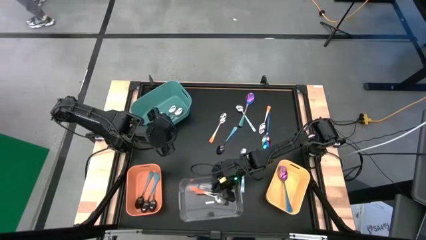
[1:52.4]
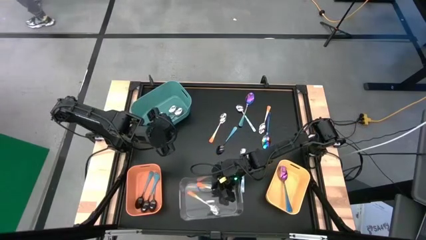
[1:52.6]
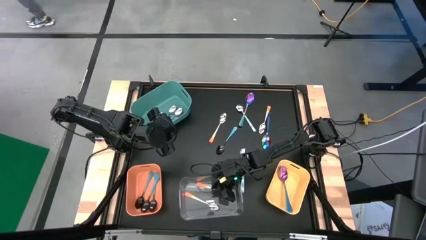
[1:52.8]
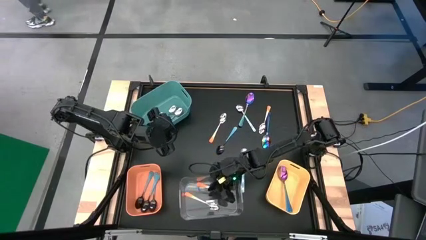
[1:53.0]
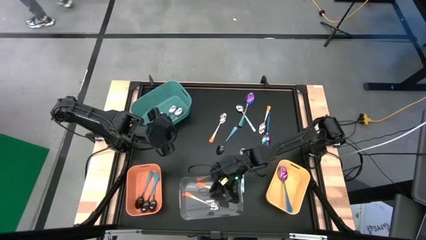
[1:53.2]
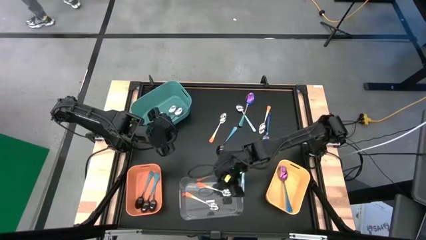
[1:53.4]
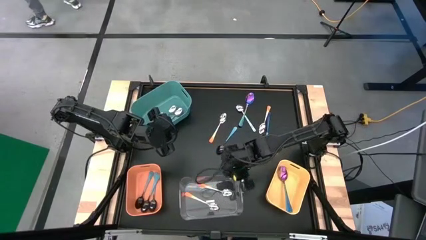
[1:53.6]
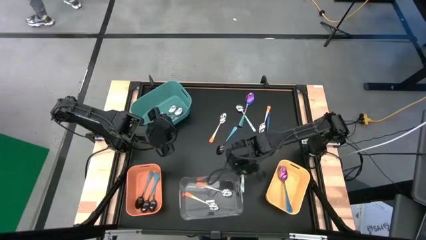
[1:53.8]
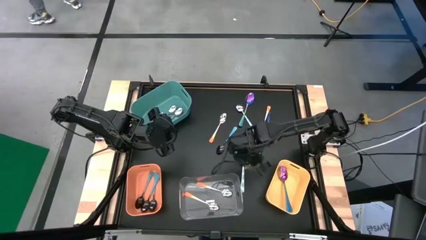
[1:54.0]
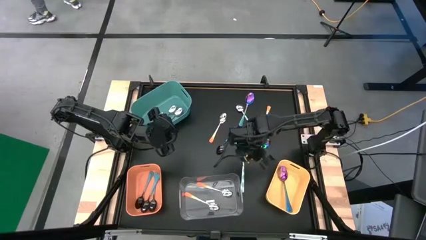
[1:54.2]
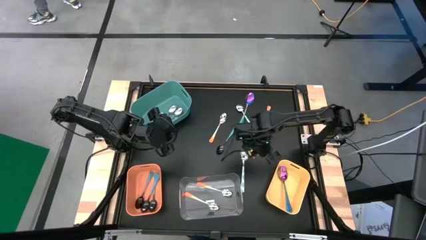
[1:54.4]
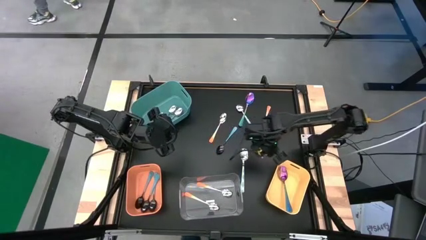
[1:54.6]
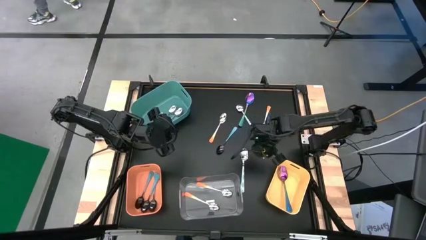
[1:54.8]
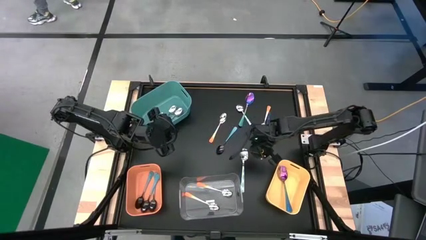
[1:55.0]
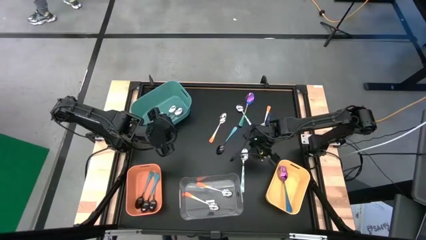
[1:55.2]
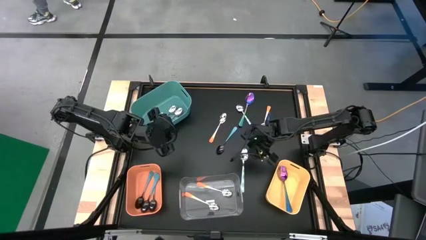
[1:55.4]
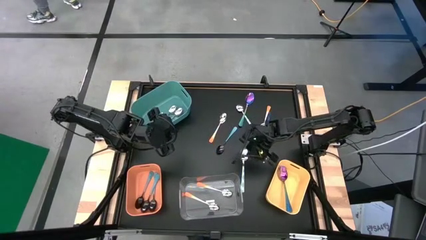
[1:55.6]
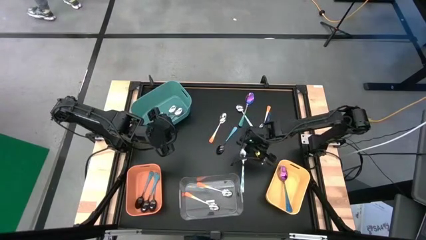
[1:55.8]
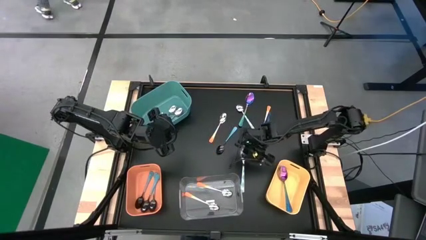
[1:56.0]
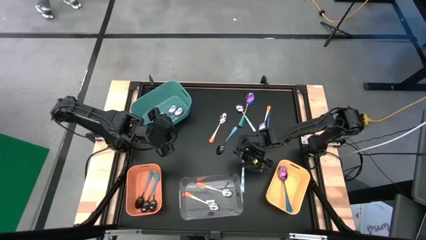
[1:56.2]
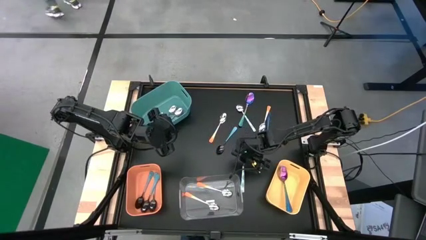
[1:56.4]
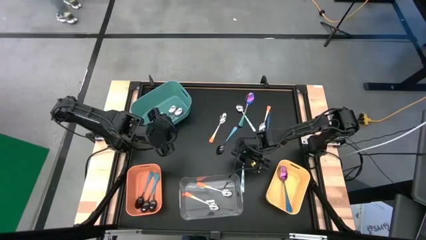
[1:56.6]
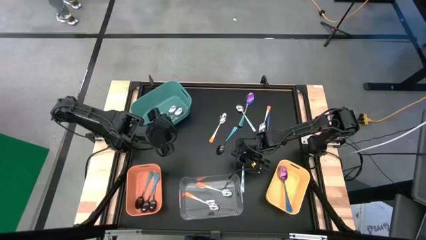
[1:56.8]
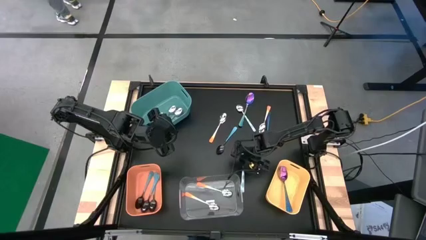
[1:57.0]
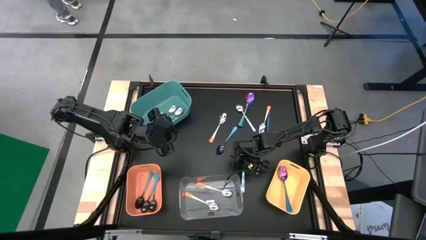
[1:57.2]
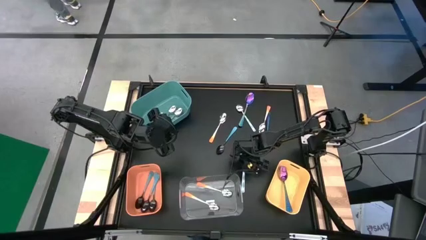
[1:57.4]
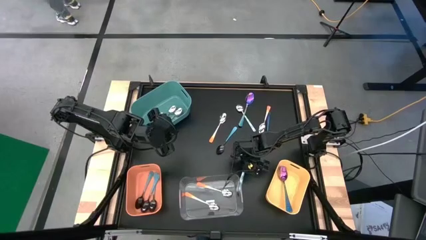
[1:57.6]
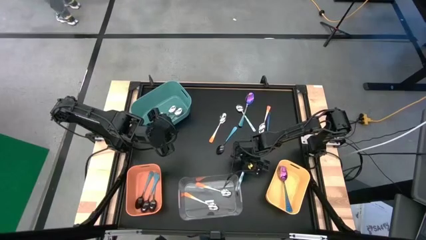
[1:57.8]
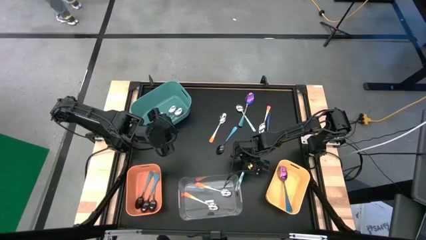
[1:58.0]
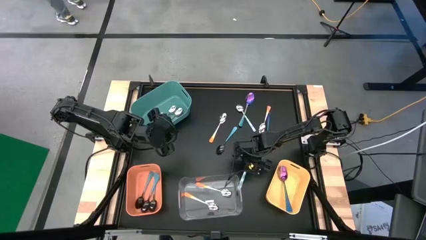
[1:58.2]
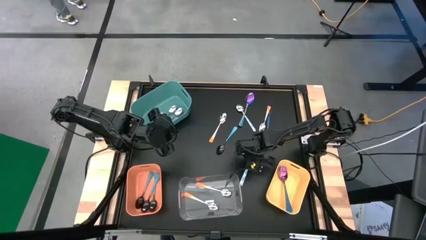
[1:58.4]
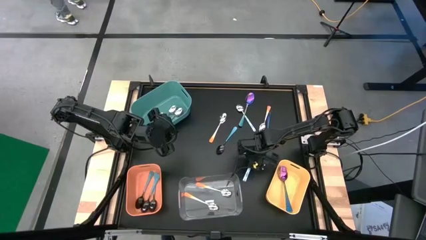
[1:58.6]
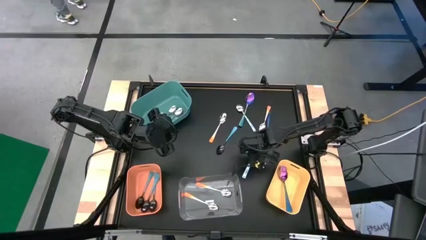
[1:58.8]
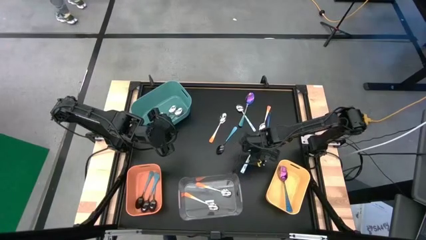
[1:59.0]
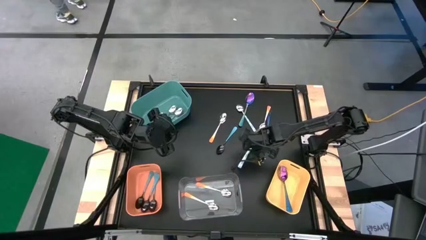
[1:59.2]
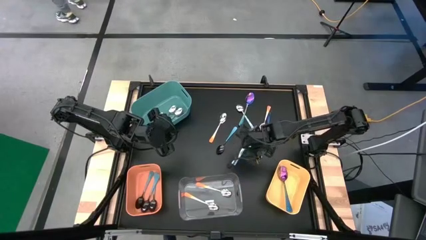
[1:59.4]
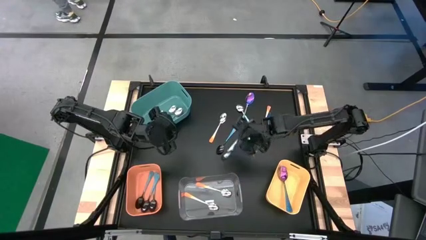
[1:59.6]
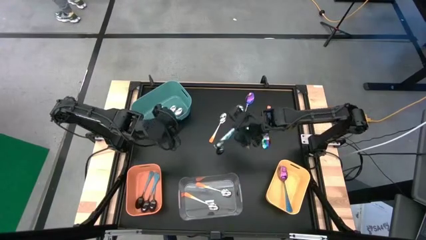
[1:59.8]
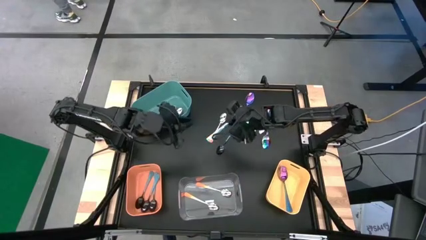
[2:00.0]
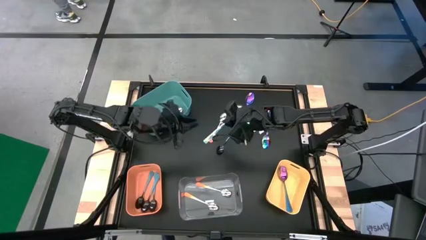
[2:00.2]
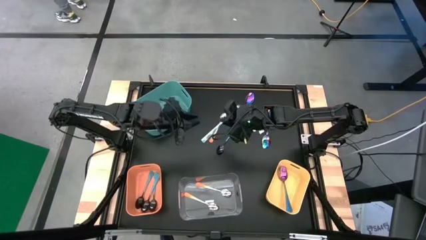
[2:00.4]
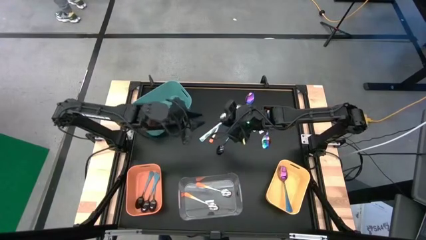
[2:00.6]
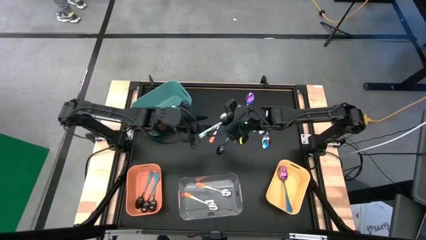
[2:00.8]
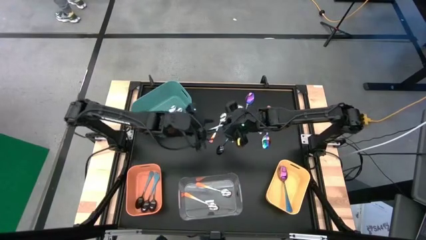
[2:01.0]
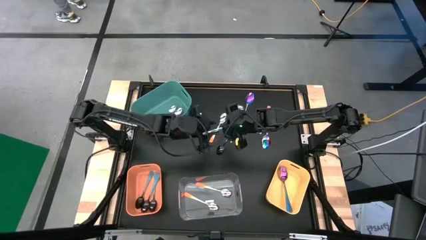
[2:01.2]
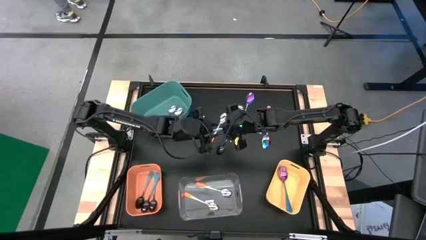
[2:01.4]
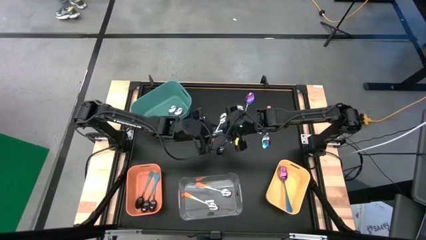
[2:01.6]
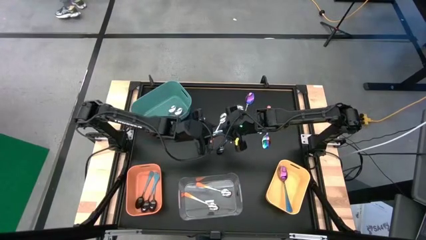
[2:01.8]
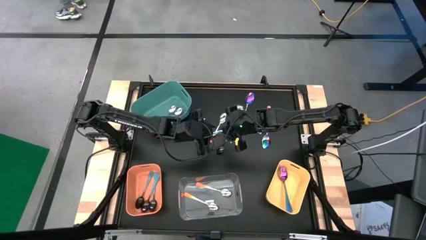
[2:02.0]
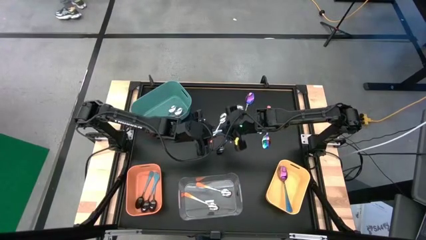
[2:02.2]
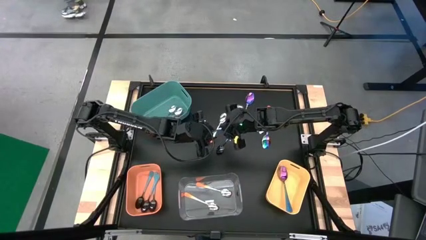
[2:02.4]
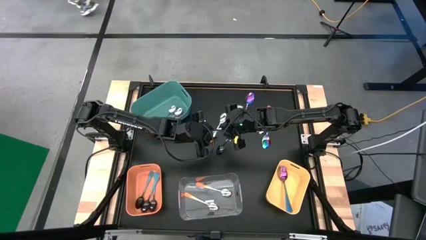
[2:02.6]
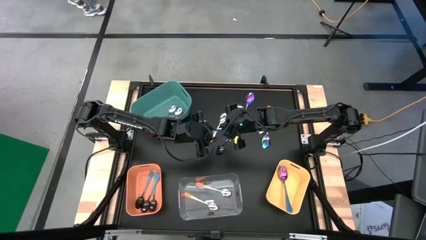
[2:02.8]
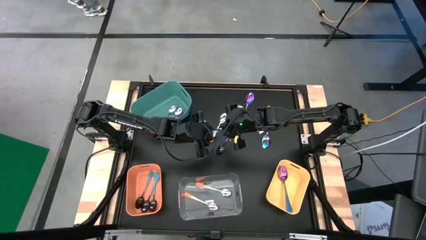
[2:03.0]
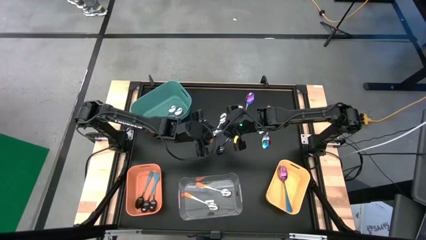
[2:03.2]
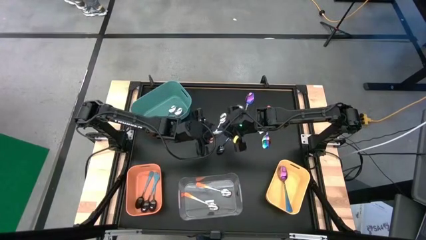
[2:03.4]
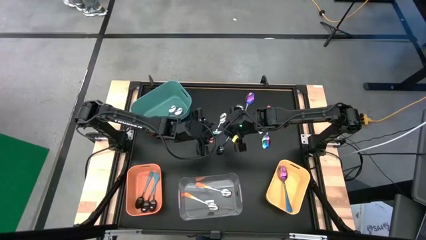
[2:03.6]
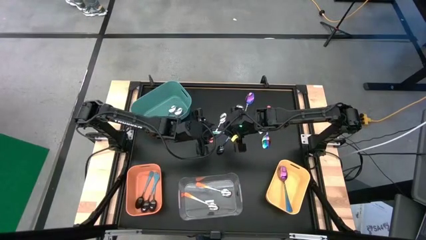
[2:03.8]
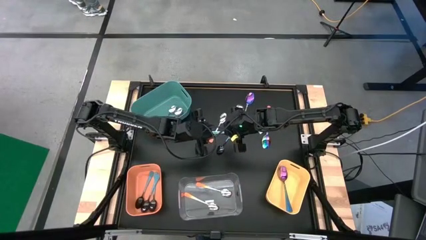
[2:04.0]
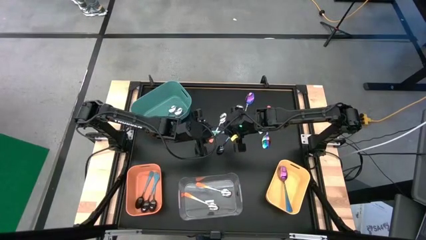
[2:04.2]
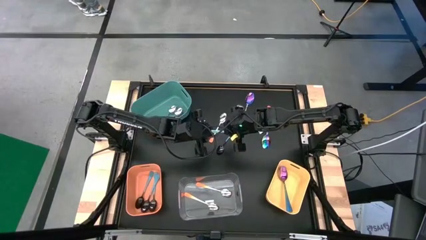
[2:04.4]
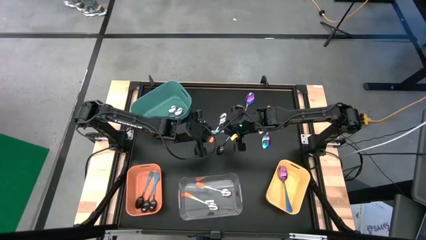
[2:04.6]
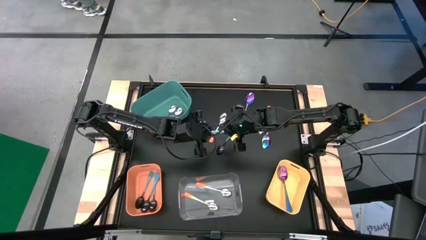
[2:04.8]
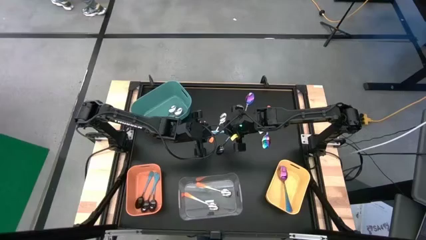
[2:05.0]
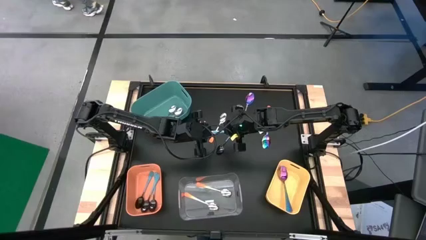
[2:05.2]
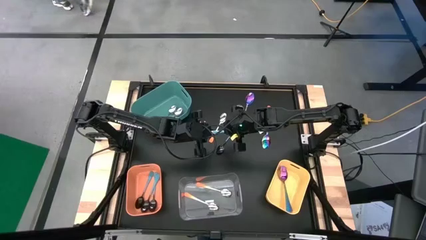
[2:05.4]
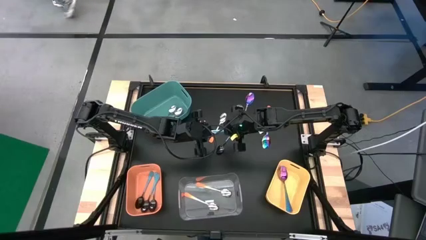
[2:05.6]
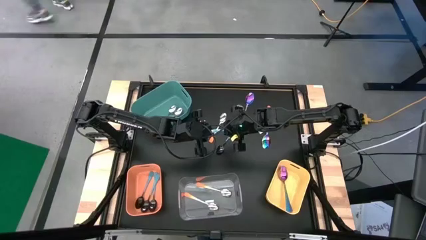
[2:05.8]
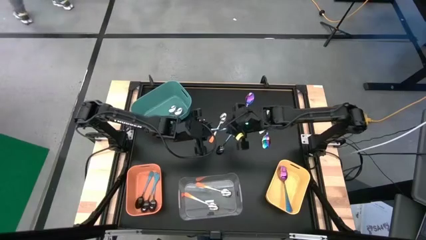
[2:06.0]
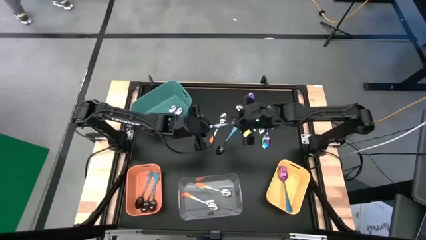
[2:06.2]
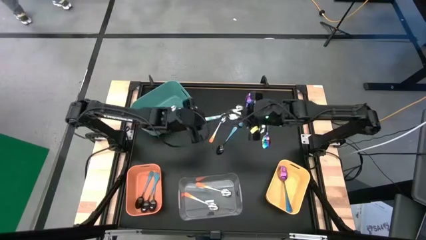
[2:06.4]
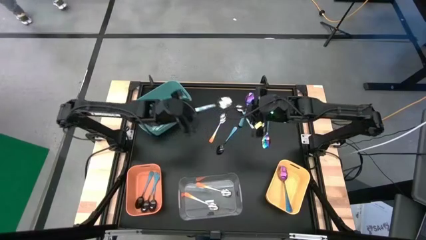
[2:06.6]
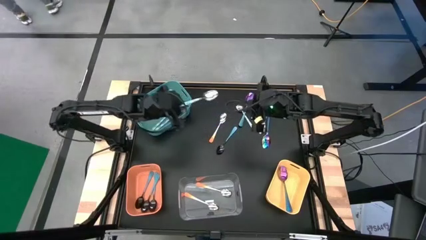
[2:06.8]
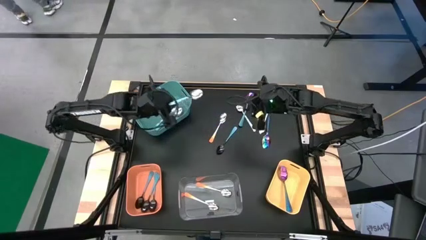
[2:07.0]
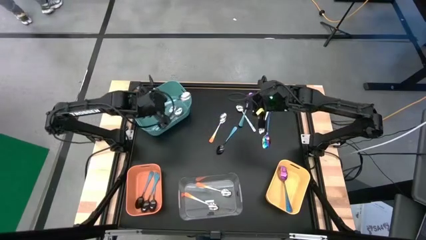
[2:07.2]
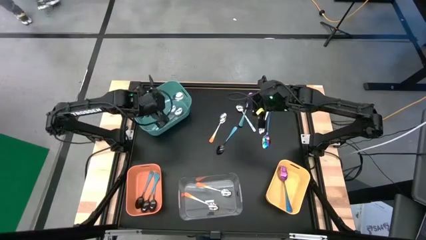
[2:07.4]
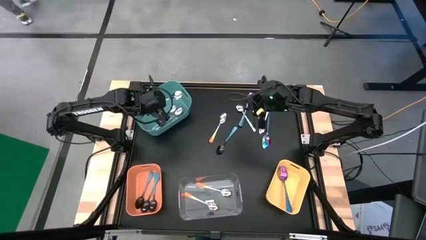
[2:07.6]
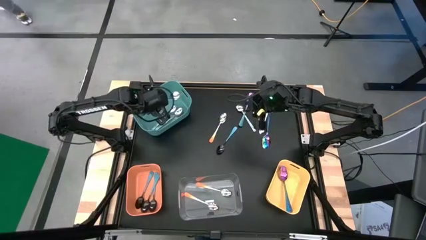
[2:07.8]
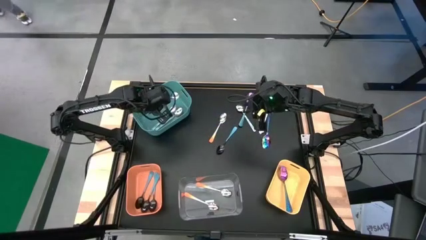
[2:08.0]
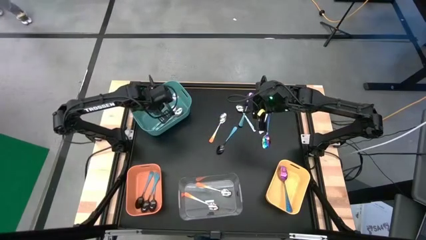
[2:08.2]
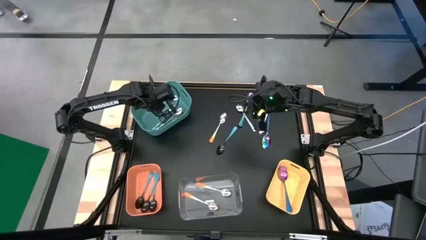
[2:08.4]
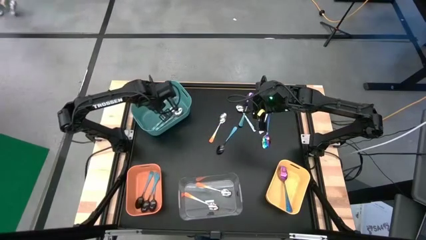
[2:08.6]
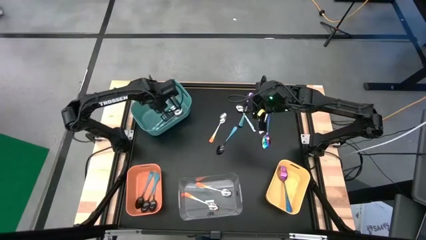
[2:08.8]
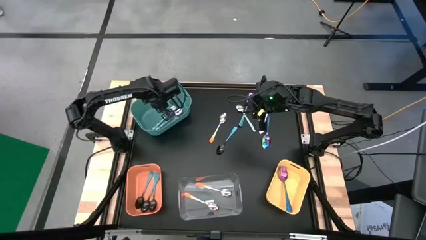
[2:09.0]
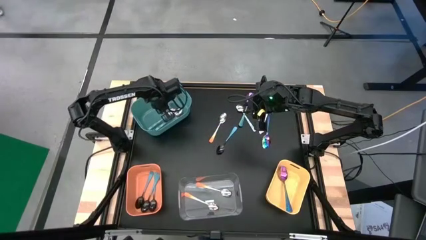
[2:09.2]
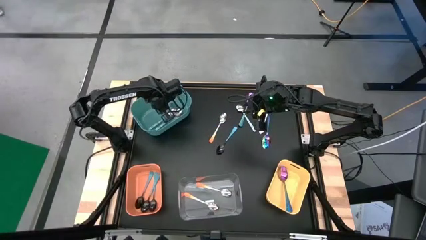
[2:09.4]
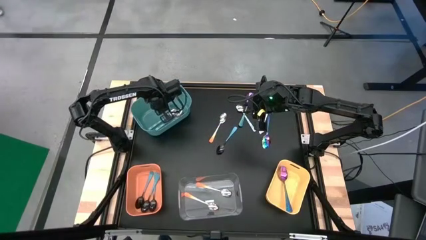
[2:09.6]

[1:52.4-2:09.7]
Task: Sort silverware by color (type)
Put the white-green spoon into the blue bin
